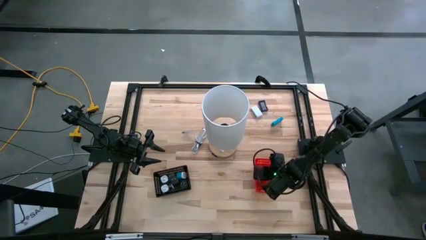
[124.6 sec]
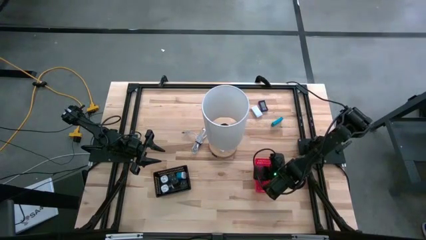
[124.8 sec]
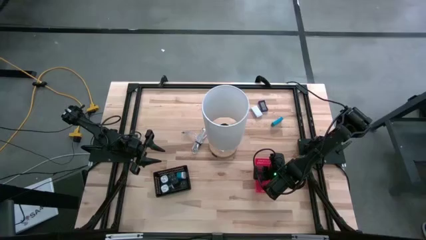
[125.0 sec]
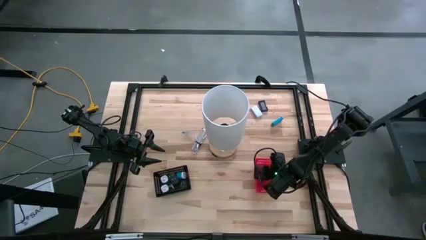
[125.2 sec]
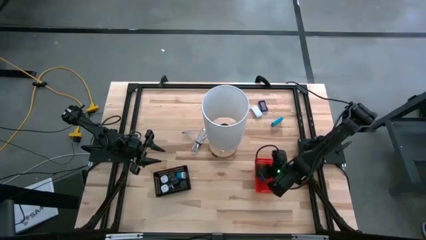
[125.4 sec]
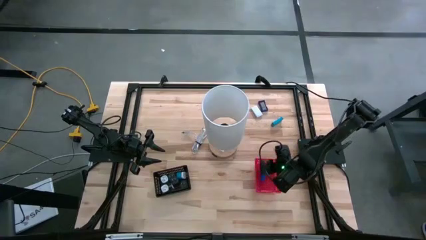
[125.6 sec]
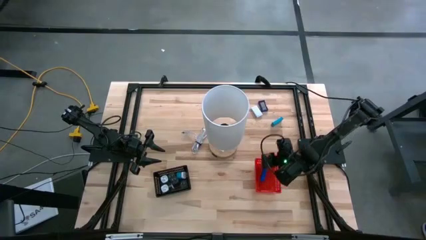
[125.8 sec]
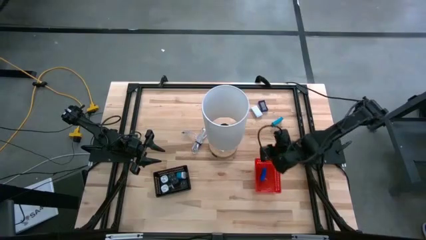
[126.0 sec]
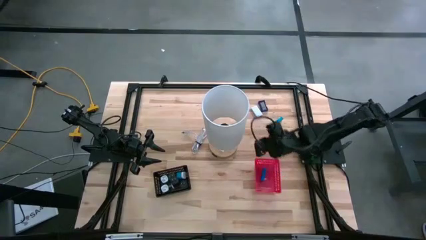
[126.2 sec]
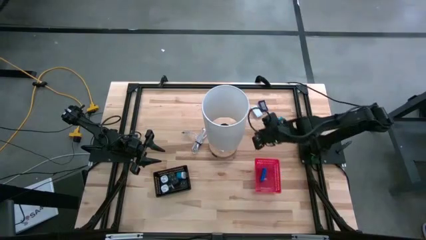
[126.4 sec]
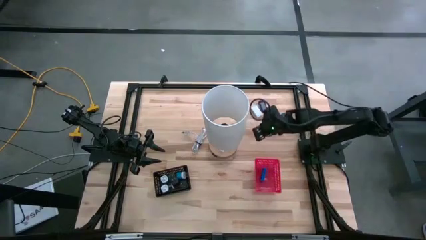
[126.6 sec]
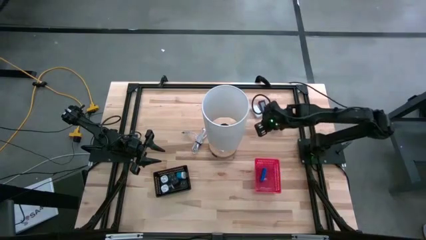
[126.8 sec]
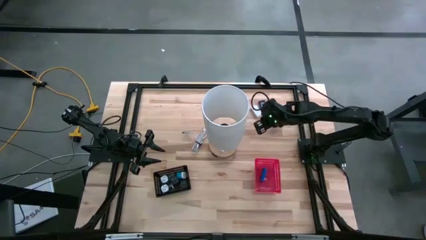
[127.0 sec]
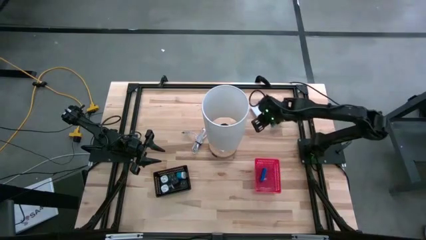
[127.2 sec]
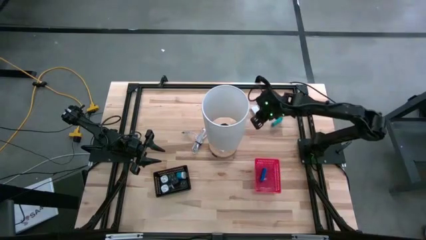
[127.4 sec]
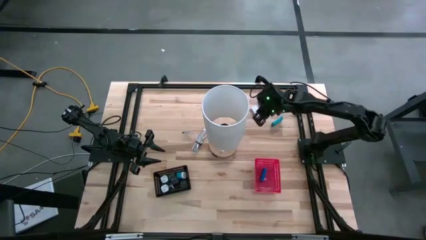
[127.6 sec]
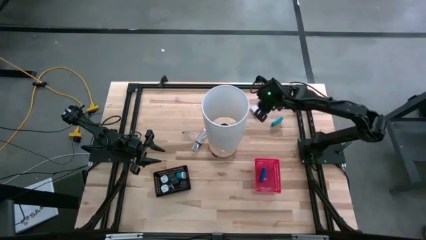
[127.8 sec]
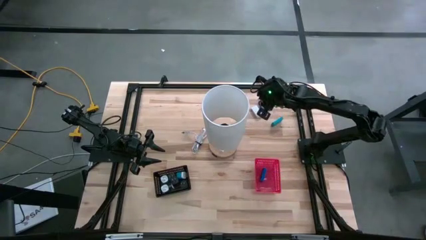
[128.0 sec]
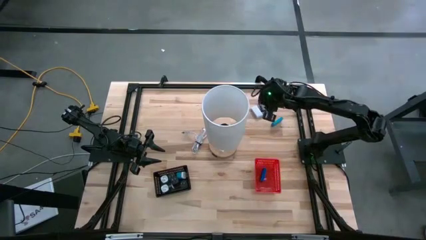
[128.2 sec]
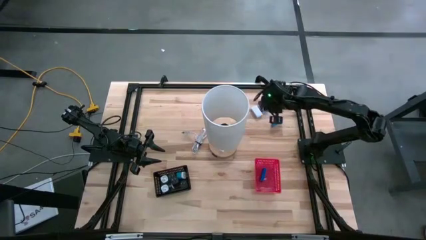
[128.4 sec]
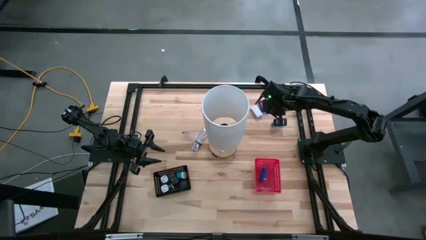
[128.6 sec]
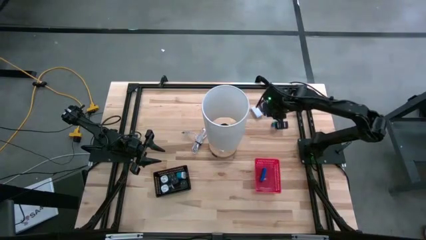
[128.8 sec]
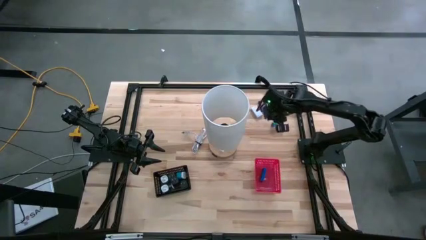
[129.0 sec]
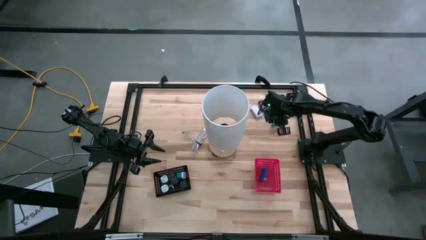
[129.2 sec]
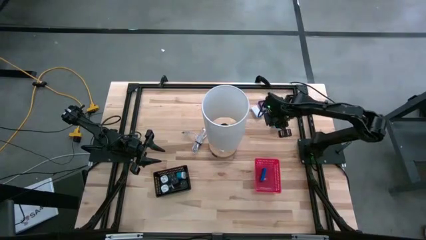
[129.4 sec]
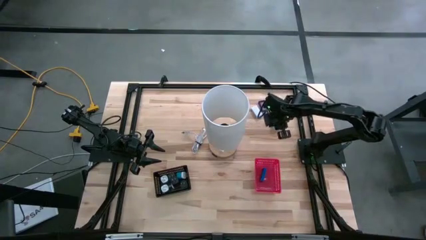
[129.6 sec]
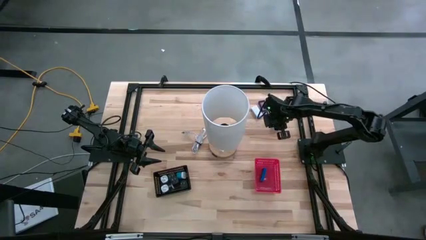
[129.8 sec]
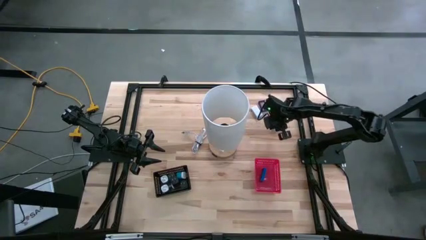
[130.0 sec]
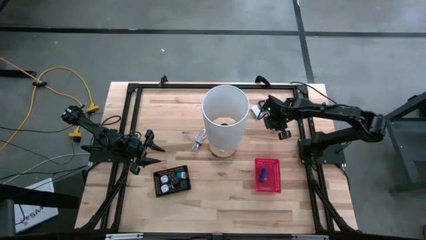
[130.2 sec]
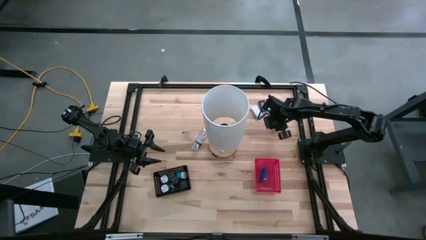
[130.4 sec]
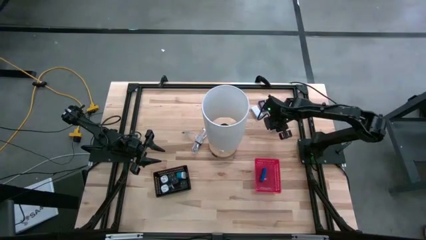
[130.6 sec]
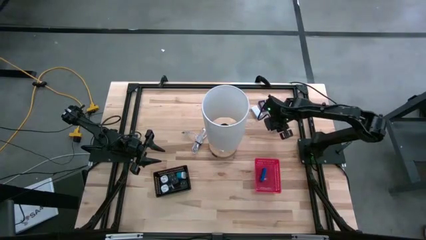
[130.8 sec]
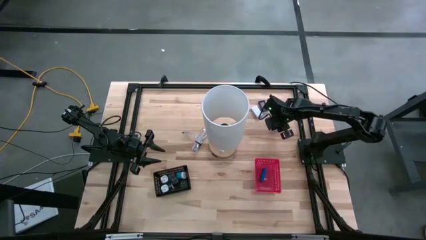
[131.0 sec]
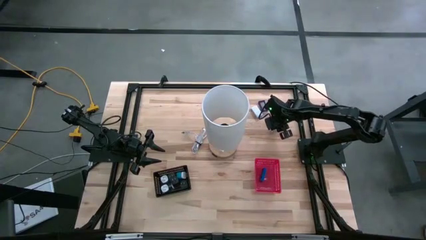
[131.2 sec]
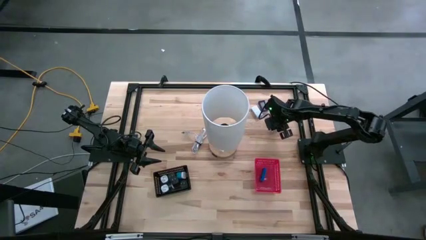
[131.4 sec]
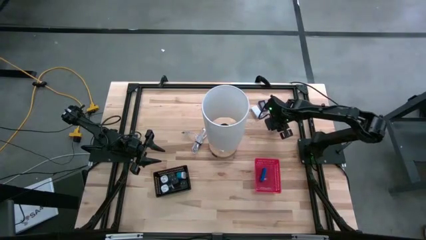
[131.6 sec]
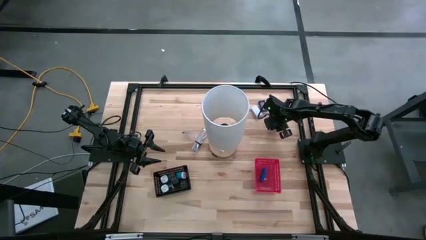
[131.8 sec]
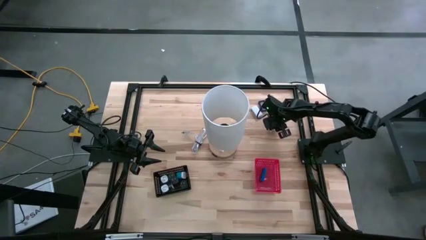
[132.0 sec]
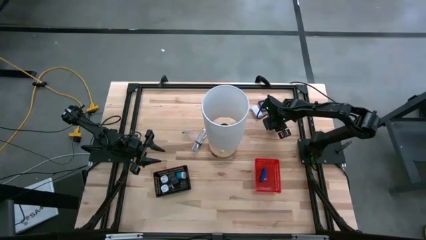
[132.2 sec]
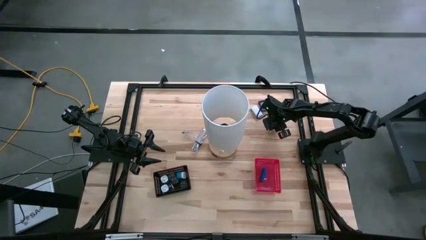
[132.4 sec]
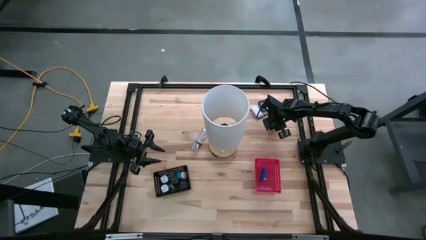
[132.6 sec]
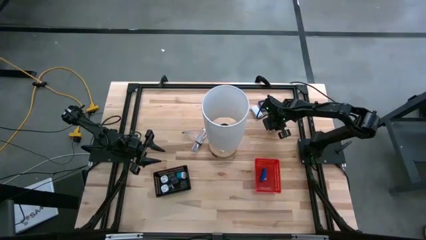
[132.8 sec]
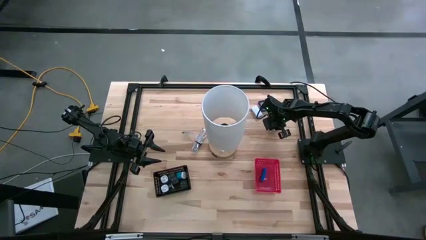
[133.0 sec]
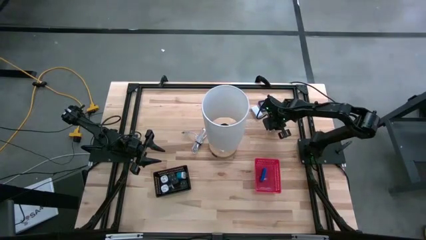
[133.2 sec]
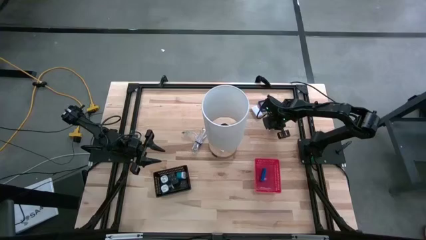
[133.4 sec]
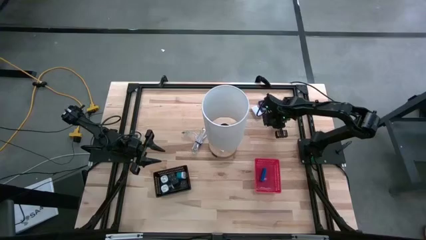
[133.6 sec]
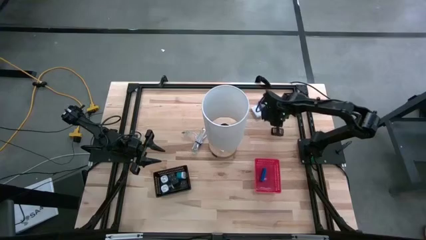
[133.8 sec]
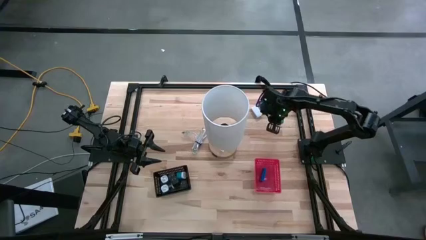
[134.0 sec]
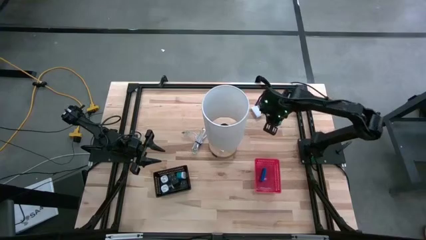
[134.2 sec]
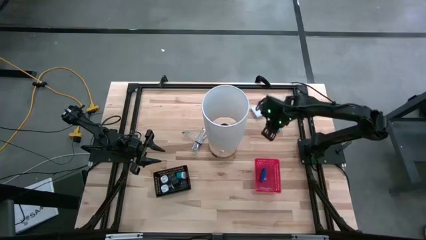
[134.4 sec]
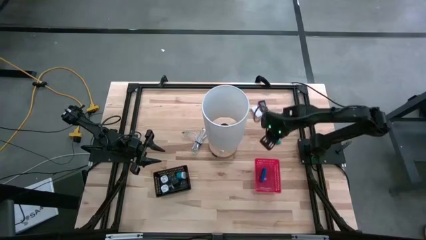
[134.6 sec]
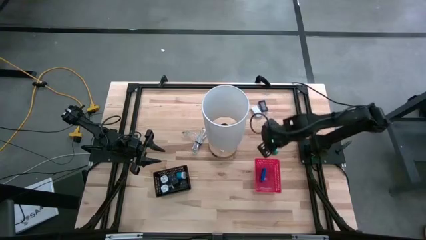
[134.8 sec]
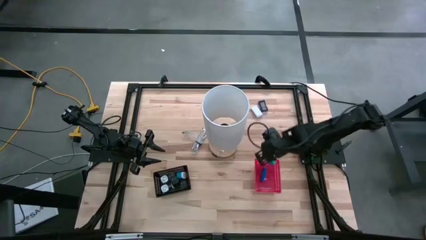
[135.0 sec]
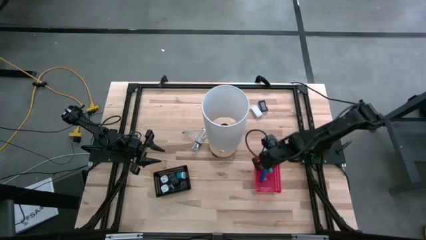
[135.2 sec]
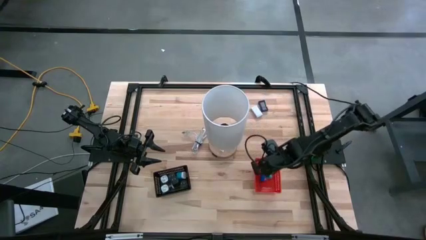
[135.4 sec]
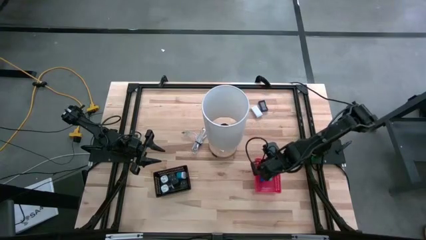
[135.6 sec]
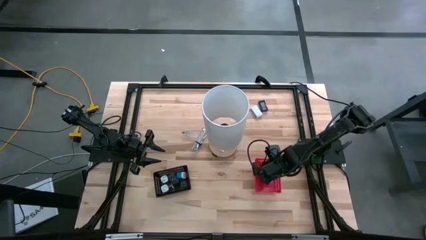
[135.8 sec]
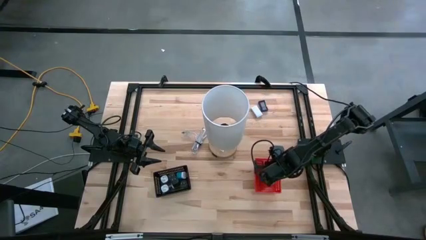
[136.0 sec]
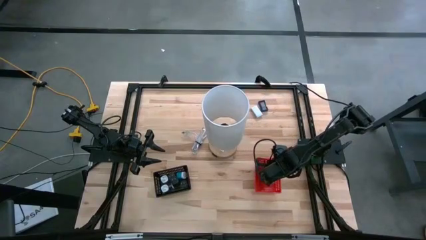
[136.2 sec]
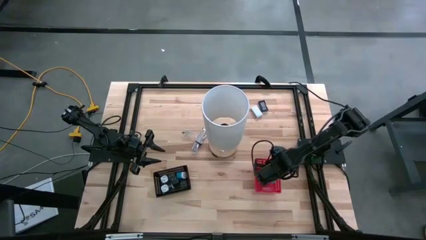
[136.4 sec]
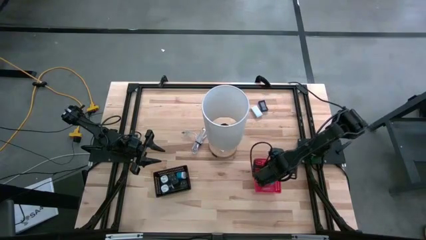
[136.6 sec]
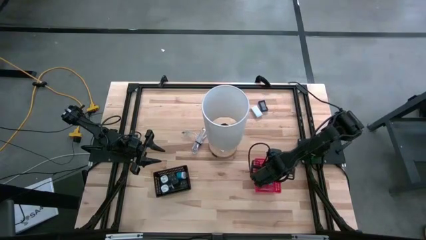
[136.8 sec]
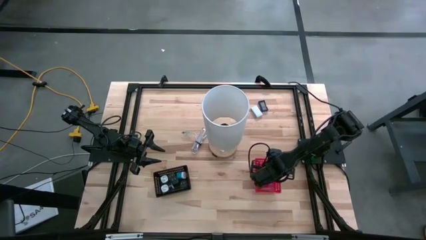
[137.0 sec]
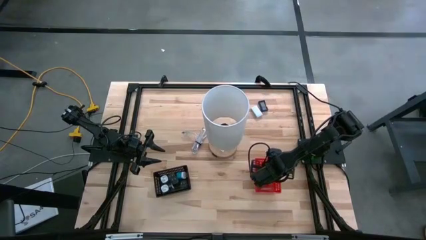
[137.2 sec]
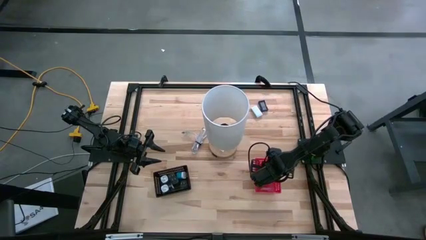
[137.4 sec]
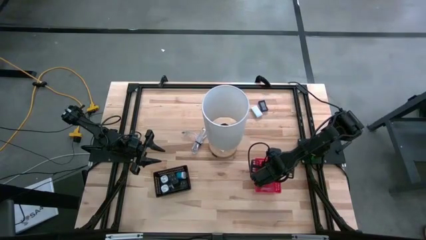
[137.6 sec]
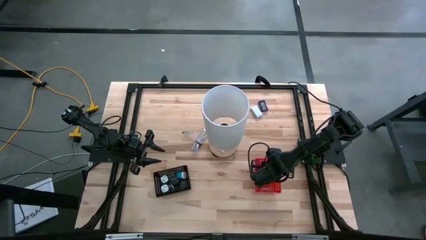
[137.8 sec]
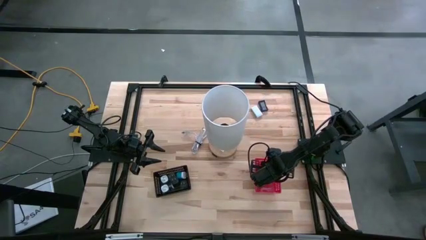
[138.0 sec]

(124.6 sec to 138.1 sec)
Task: Pick & Place Office items
Put the light blue digital clock into the orange bin

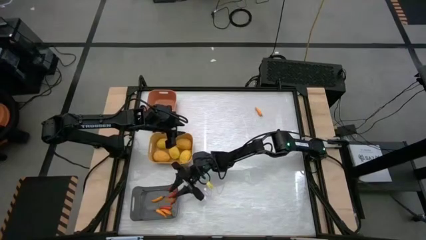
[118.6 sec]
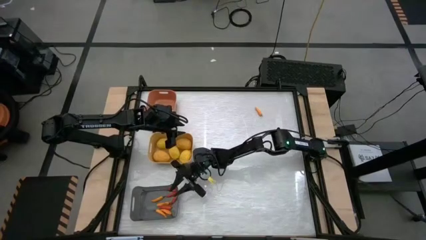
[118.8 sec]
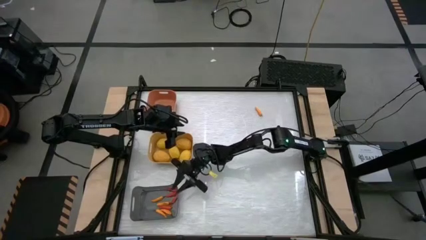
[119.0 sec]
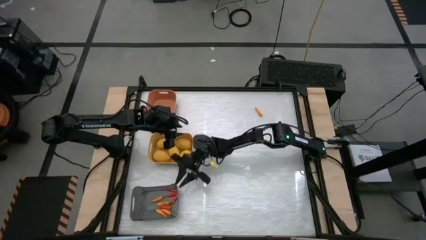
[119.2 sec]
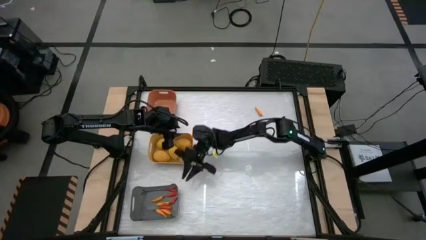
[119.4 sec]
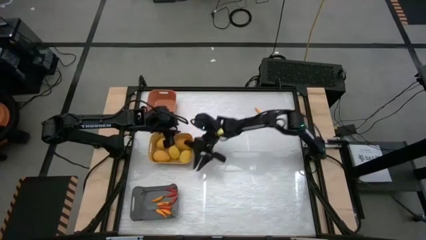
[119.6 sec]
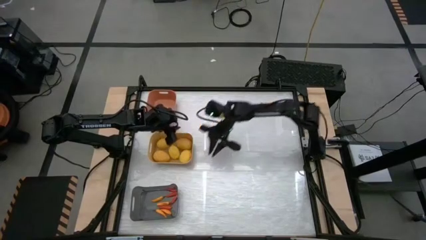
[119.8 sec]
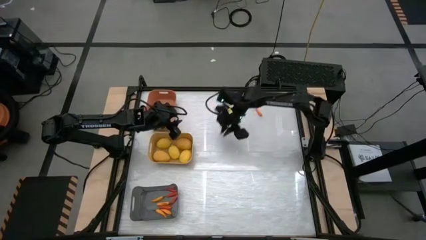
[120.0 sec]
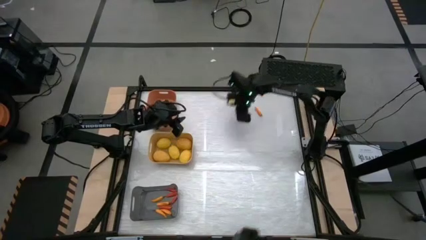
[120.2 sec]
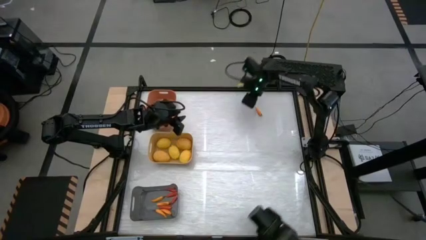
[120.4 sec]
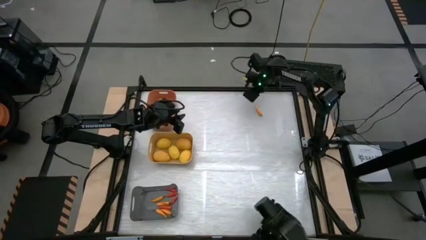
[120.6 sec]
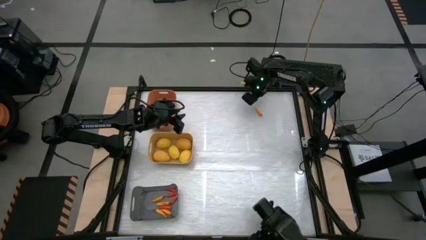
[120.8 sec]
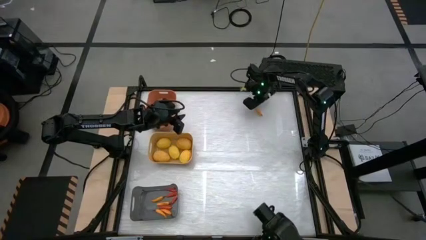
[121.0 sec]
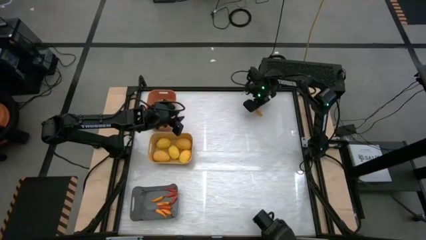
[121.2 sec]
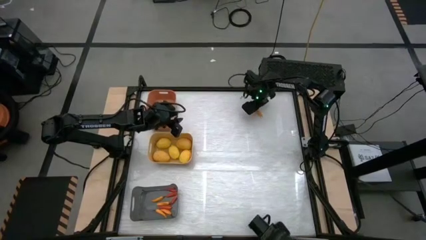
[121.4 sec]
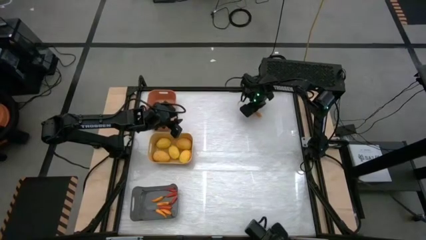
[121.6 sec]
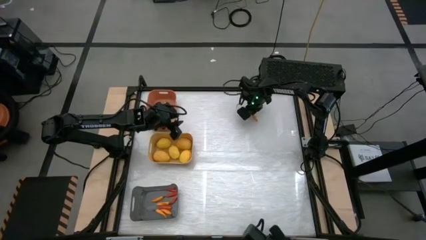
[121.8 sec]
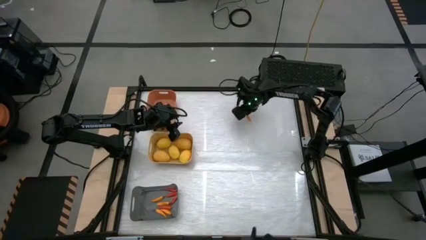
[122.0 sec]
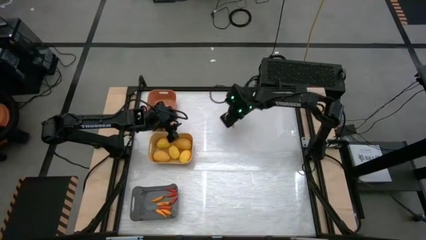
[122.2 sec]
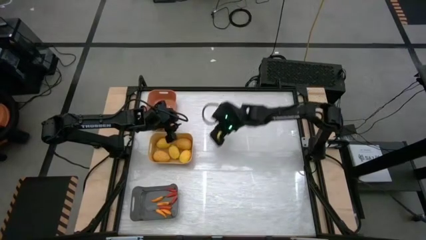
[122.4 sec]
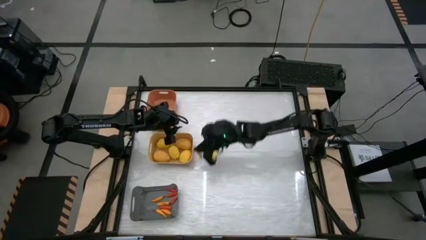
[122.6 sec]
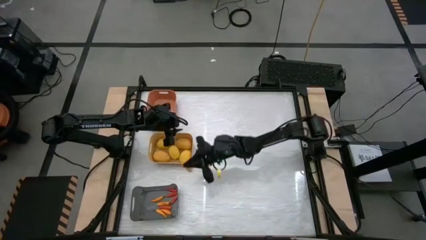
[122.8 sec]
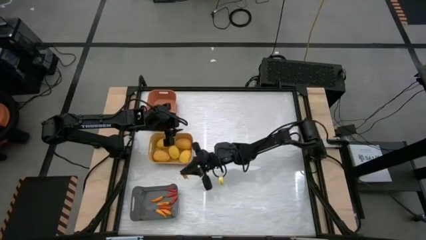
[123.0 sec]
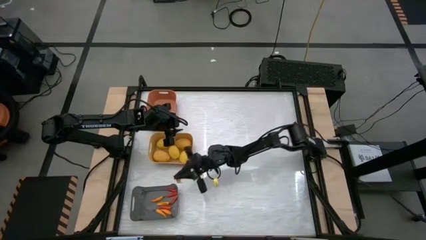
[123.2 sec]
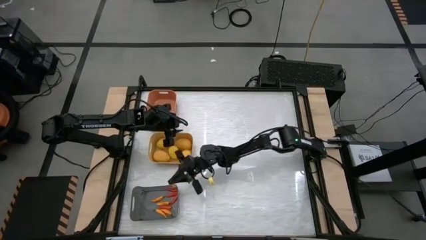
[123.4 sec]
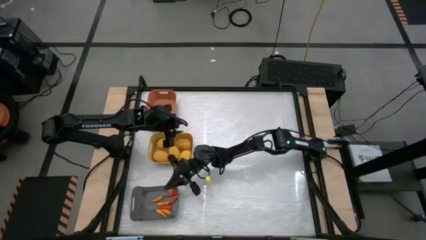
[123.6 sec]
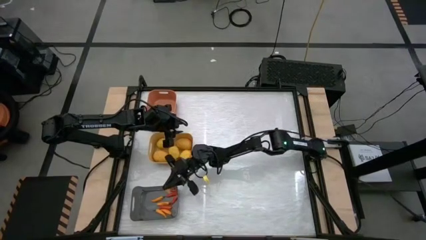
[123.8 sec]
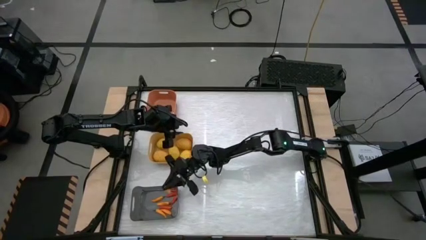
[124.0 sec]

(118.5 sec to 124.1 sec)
Task: Sort produce into baskets
Put the yellow chili pepper into the gray bin
